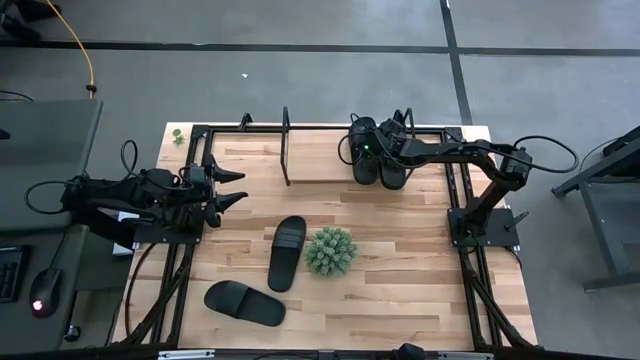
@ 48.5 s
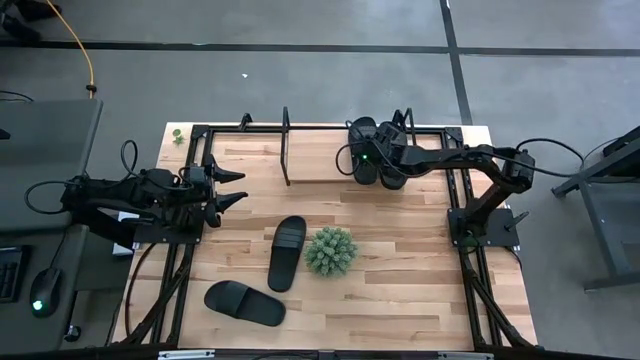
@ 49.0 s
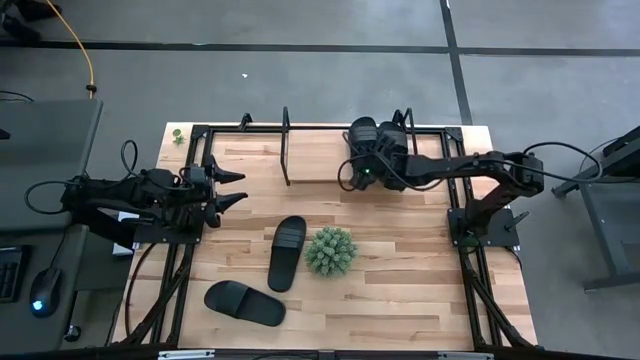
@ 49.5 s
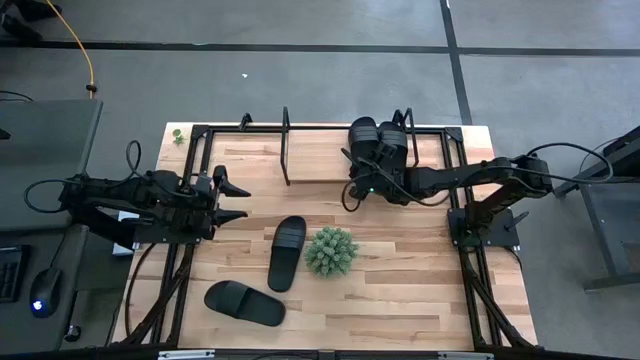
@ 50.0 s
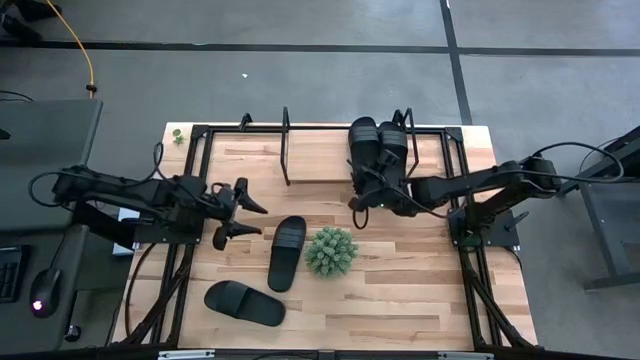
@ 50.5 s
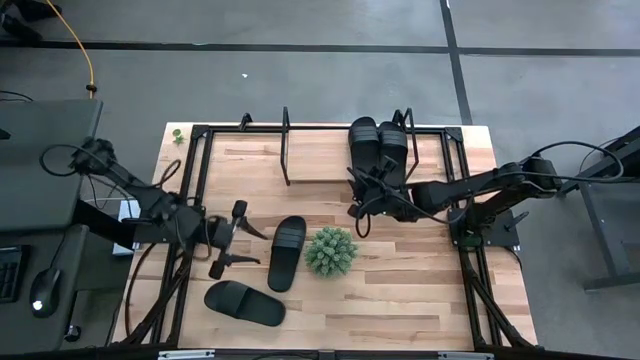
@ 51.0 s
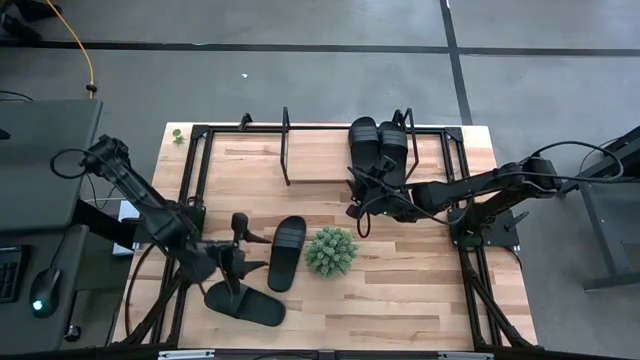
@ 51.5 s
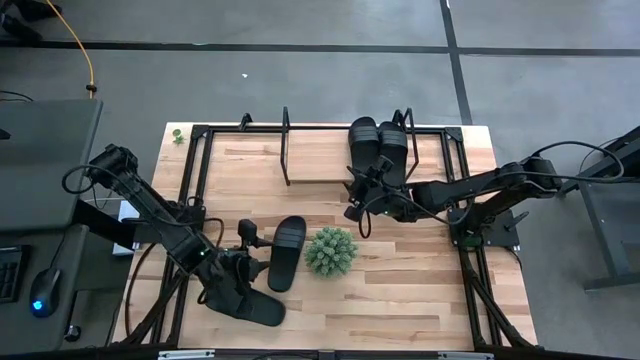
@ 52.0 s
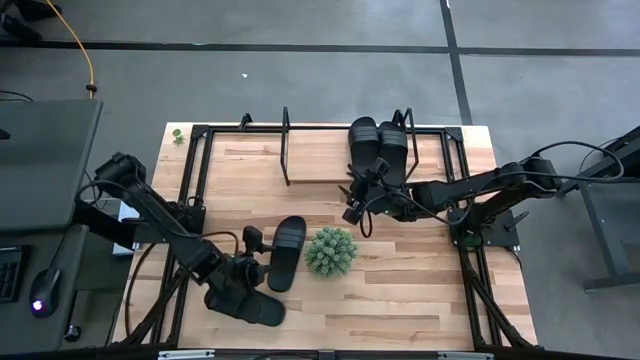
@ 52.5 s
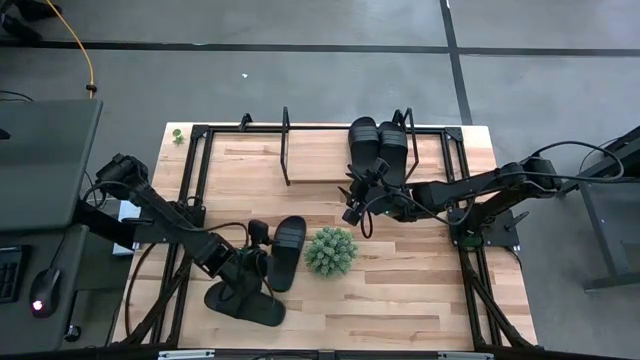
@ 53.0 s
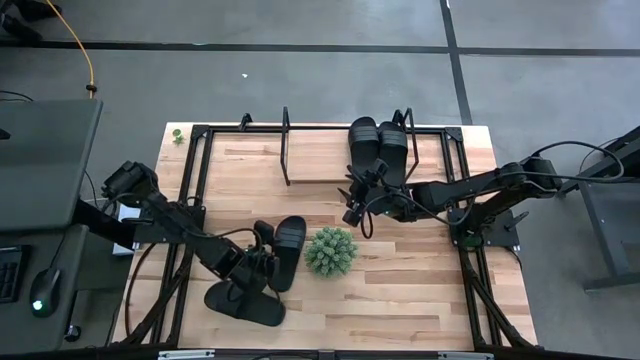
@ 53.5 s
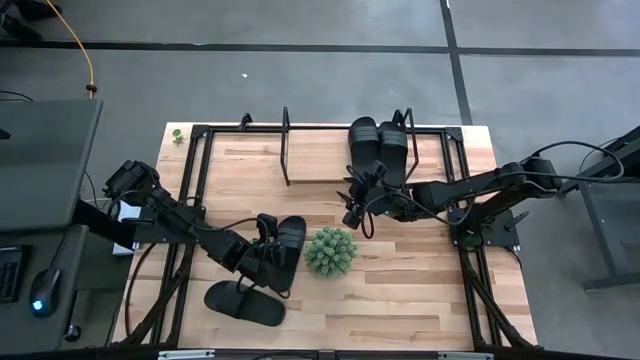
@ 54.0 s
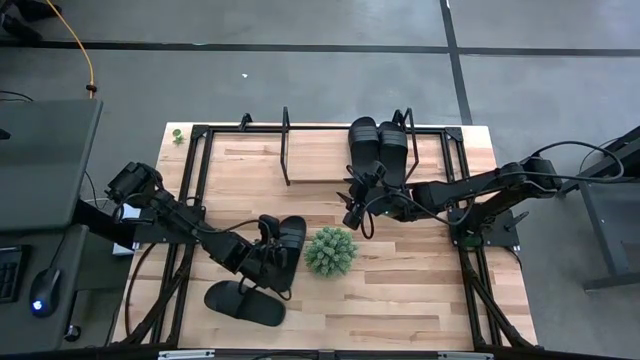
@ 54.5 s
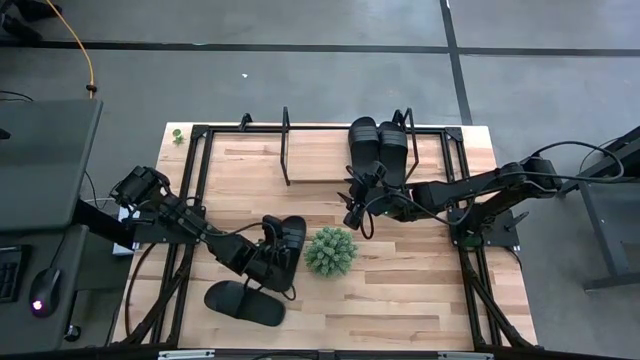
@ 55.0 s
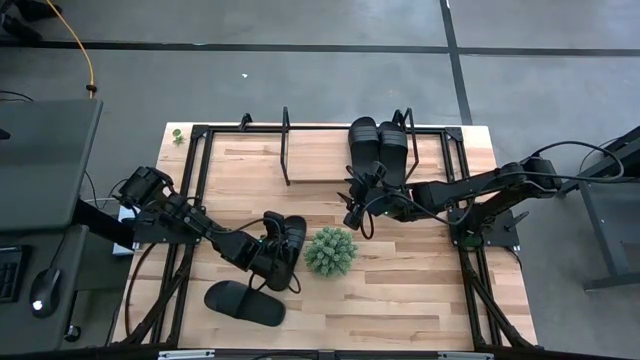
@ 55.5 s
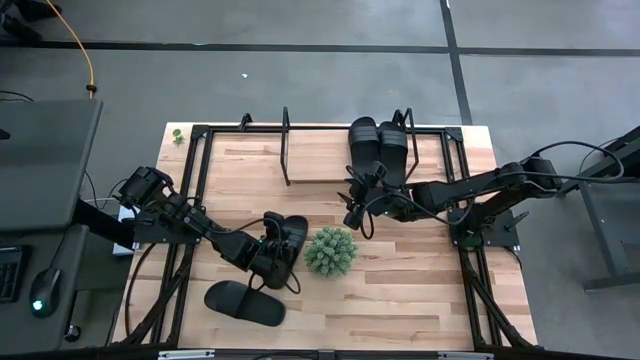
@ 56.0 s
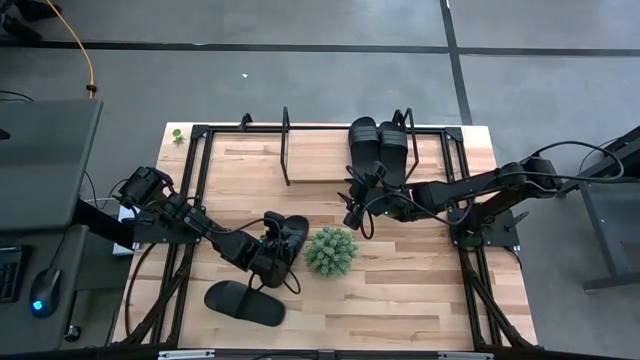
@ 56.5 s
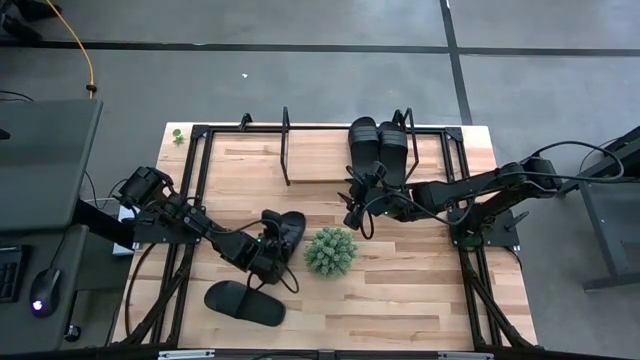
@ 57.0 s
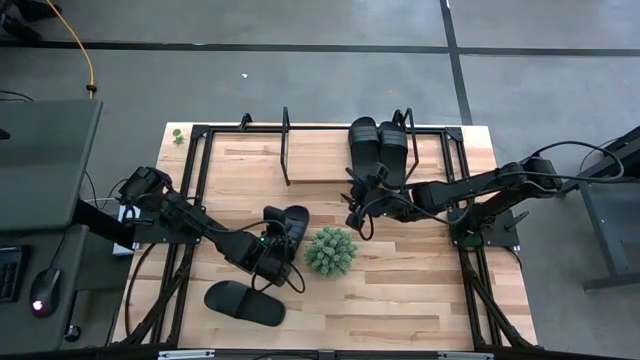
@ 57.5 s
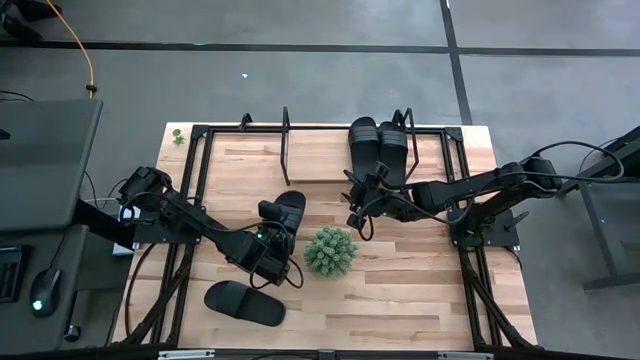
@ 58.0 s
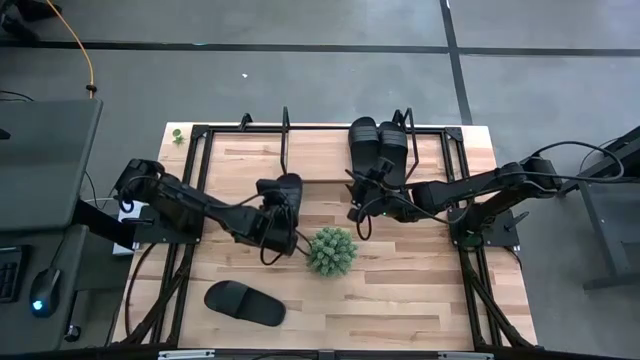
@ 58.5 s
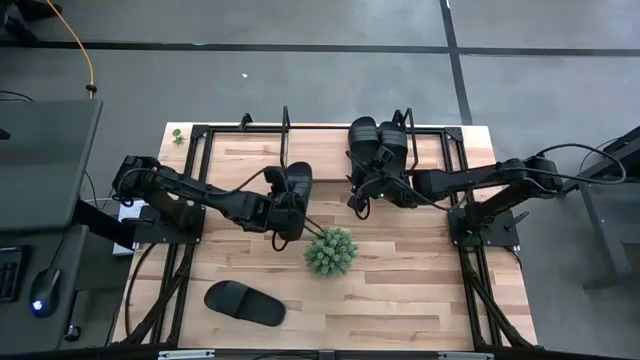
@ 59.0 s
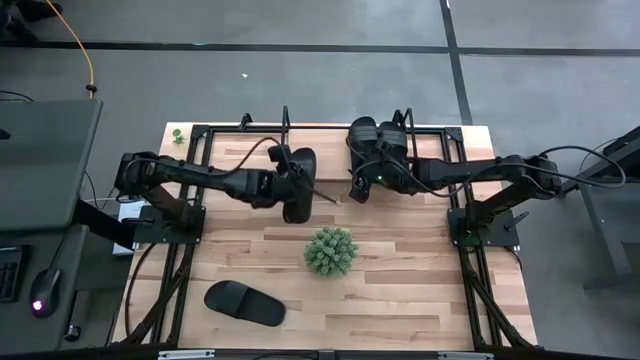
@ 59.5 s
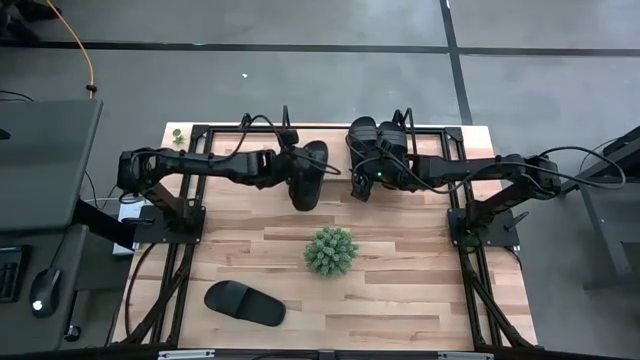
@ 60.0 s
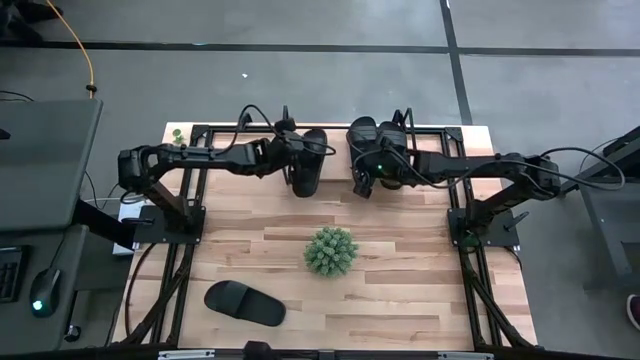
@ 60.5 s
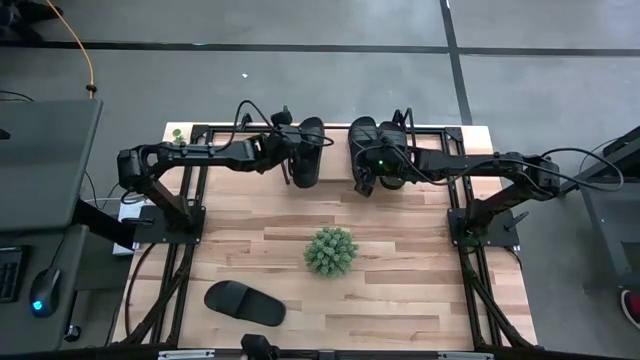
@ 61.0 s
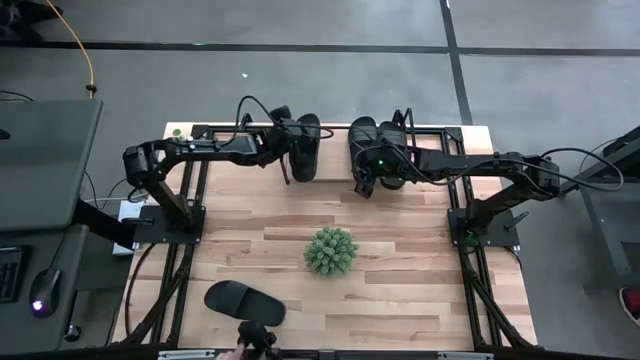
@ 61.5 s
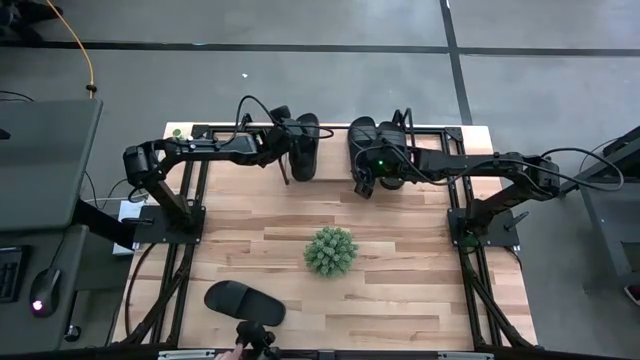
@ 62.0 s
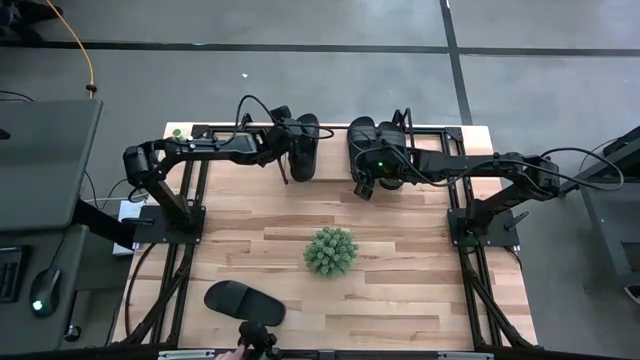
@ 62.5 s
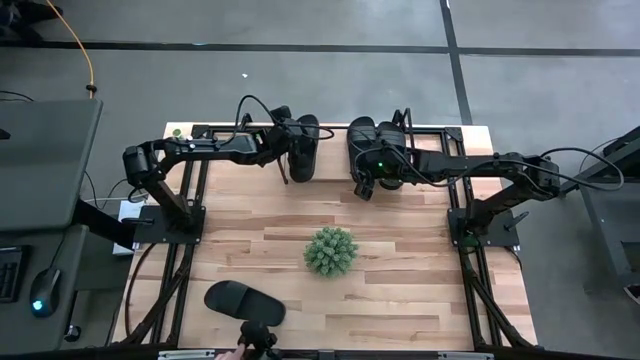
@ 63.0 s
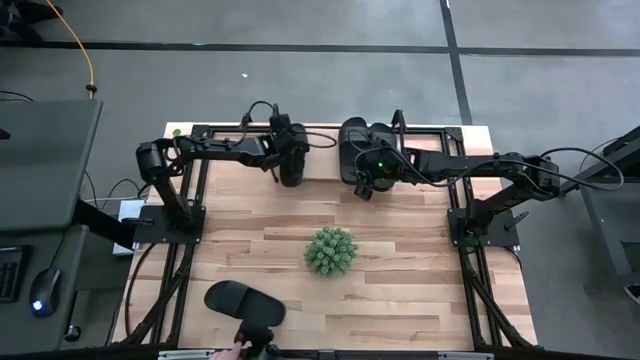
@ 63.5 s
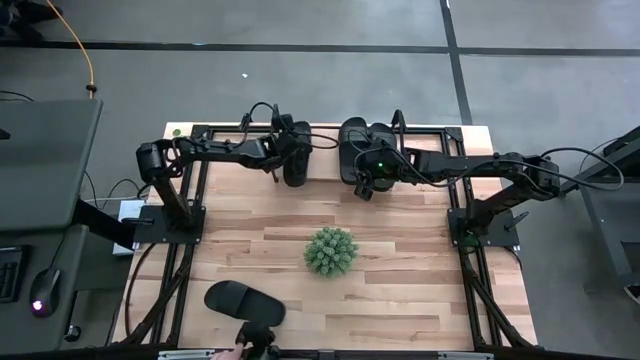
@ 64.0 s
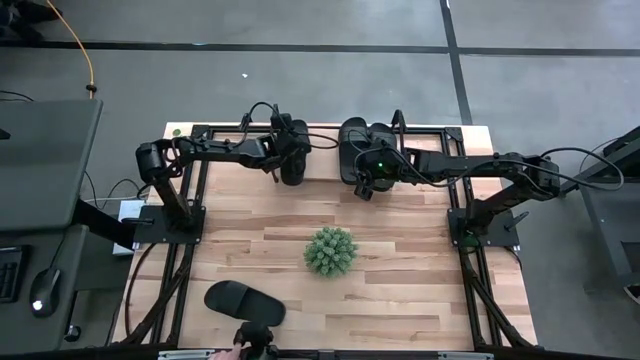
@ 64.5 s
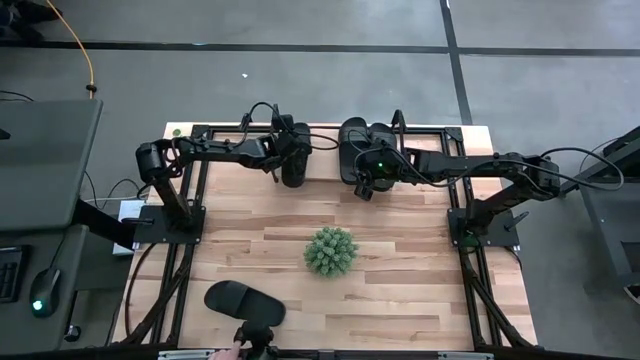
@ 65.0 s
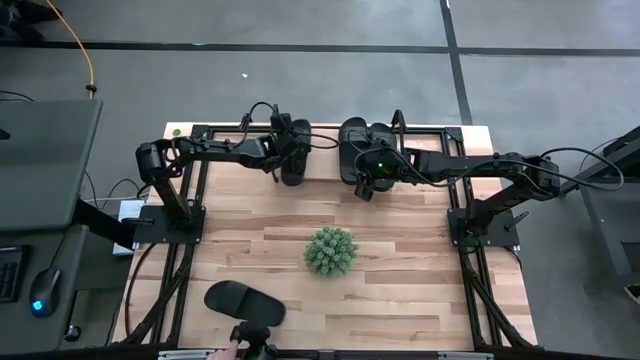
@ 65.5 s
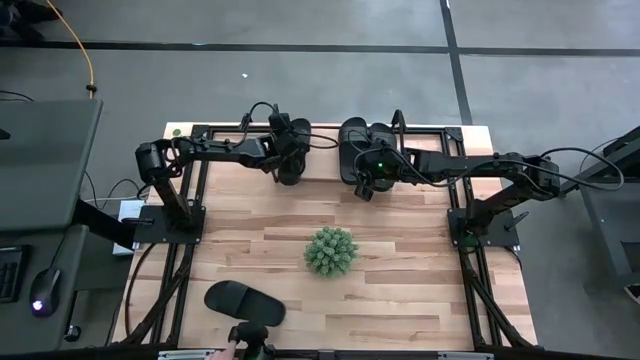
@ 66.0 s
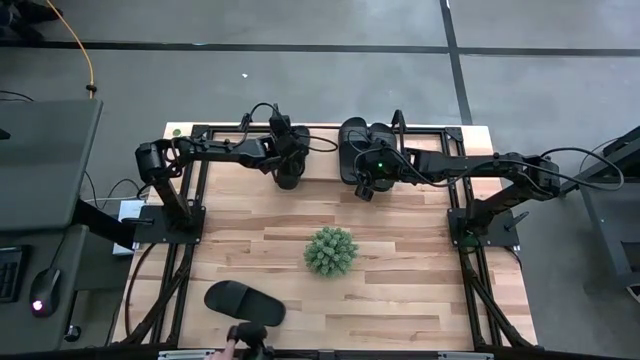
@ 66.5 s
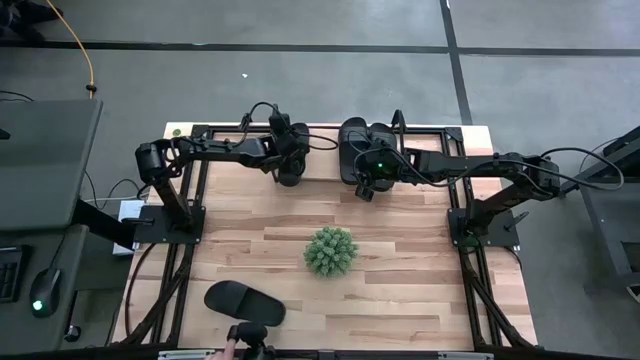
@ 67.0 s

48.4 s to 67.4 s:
Task: Pick and place slides into the shelf
Put the top black slide on the shelf

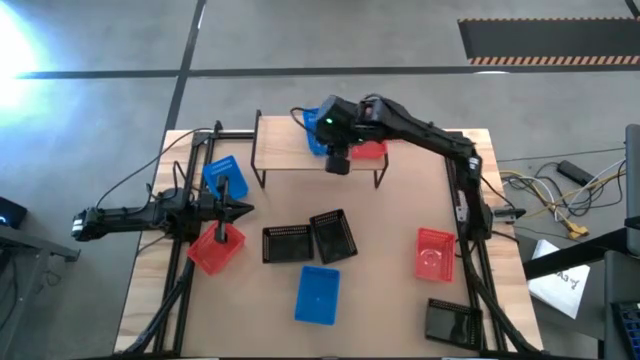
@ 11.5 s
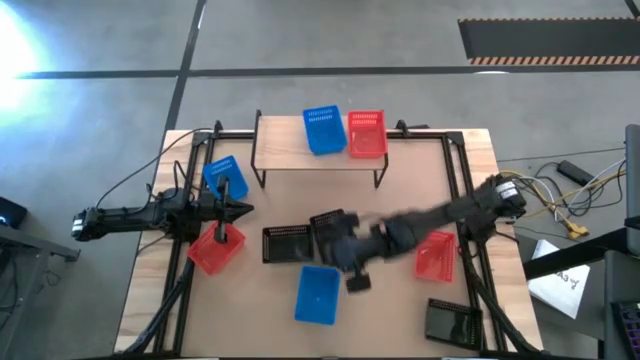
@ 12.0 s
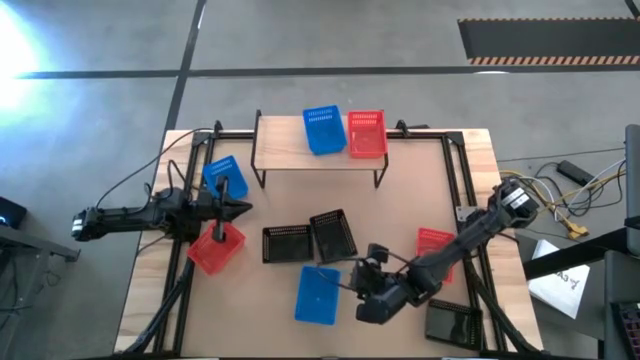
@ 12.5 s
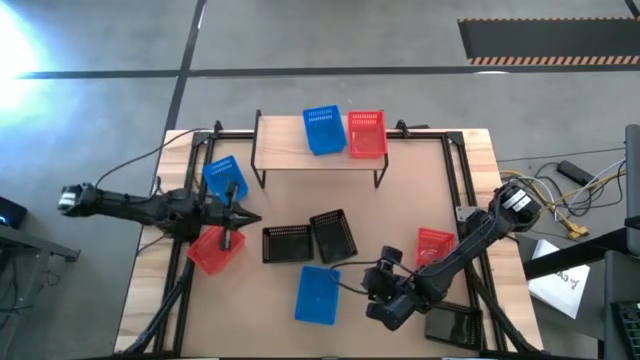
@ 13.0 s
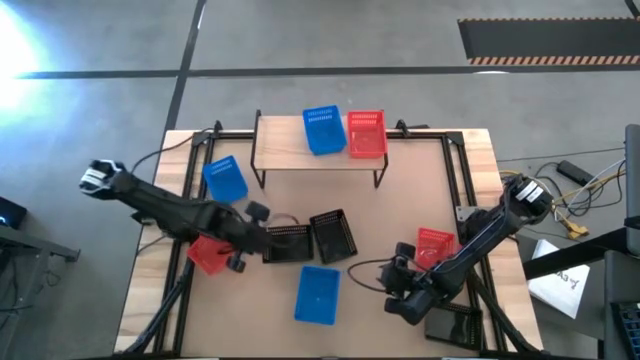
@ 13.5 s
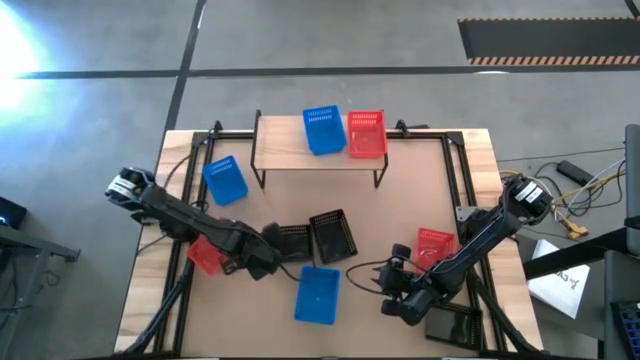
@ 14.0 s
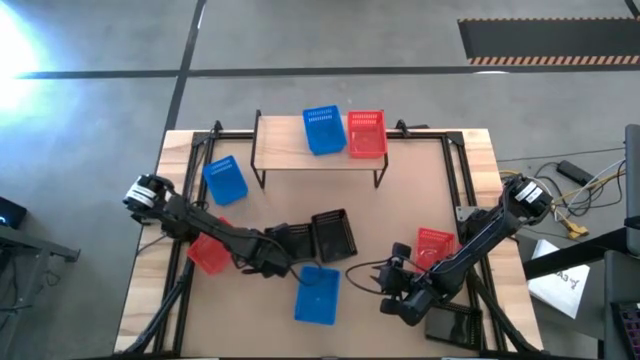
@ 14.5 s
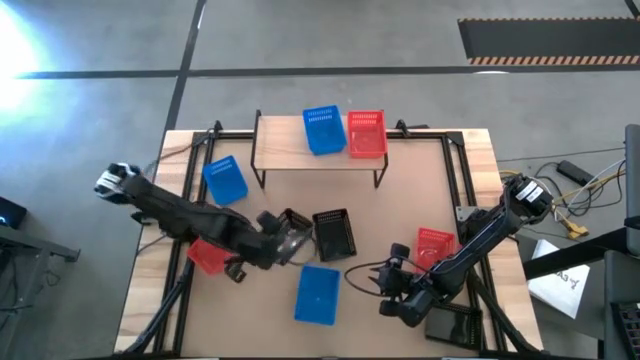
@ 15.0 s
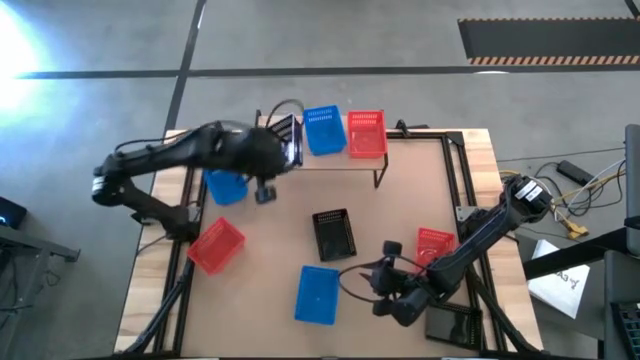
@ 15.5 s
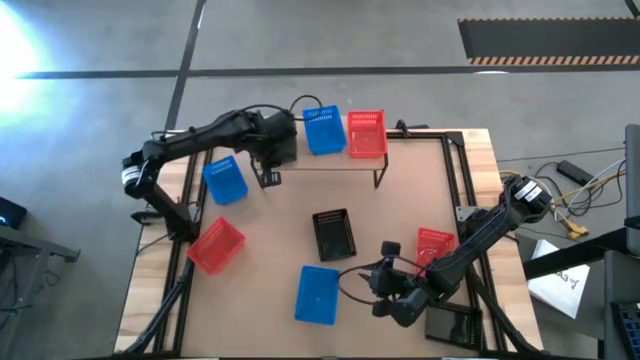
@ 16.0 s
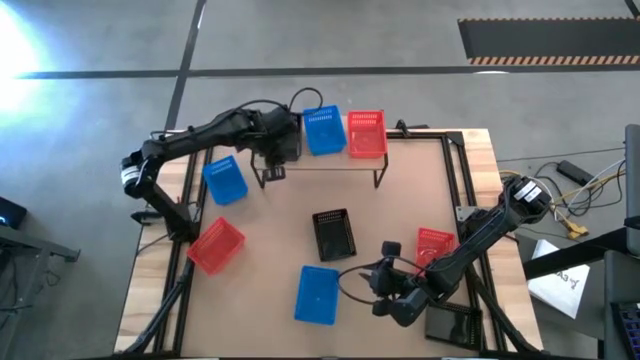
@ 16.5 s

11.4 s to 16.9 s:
Task: Stack baskets on shelf by color
Put the left black bin on the shelf
